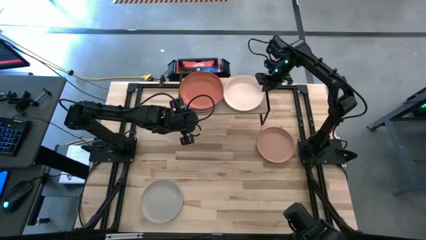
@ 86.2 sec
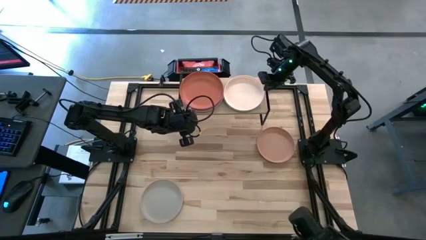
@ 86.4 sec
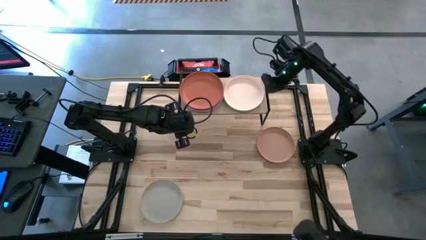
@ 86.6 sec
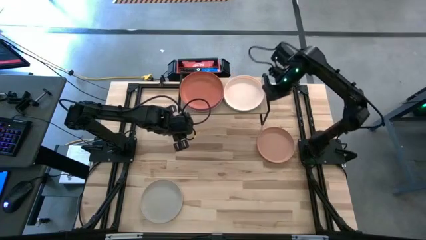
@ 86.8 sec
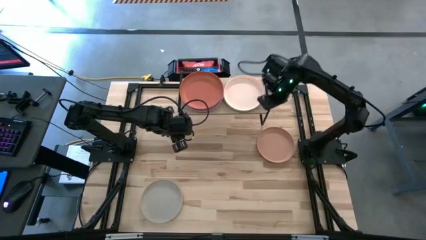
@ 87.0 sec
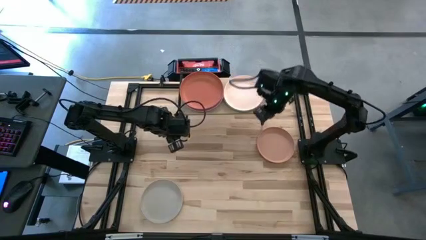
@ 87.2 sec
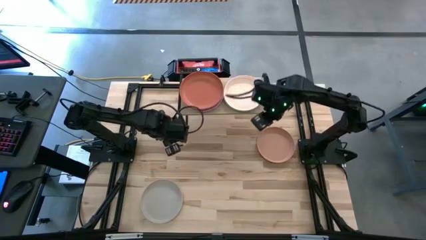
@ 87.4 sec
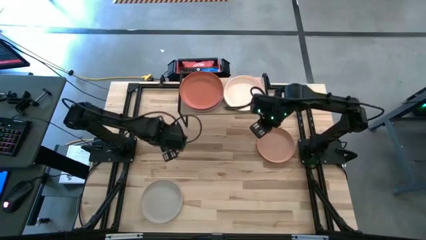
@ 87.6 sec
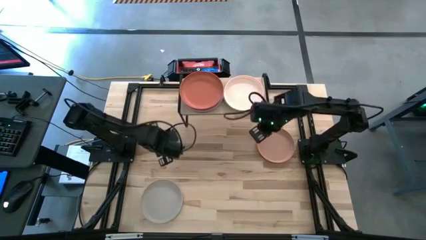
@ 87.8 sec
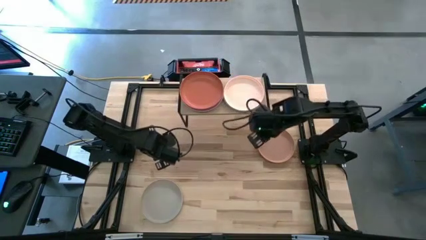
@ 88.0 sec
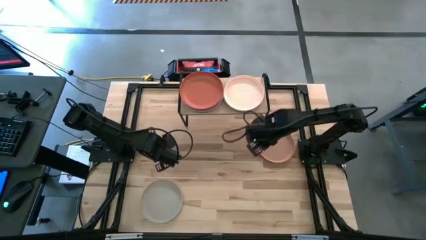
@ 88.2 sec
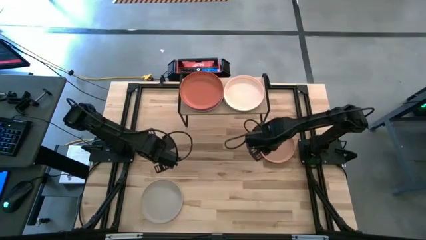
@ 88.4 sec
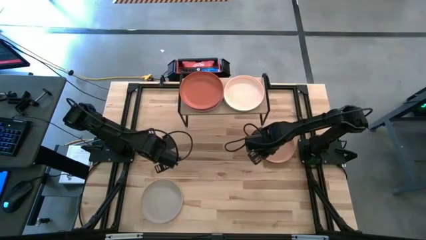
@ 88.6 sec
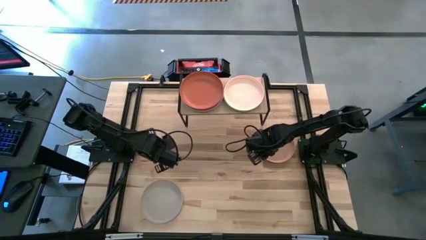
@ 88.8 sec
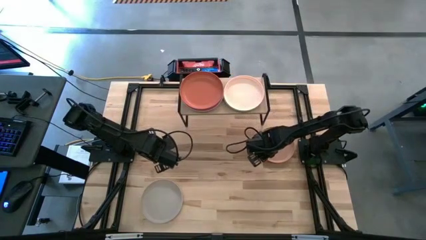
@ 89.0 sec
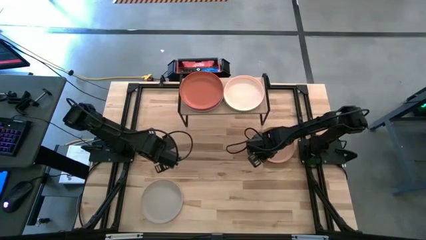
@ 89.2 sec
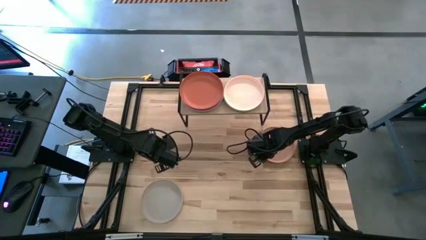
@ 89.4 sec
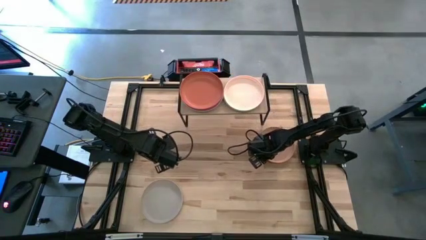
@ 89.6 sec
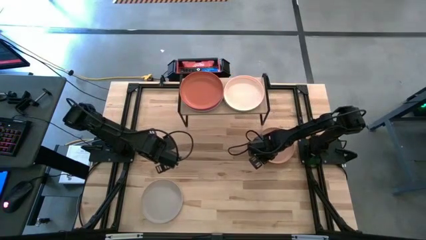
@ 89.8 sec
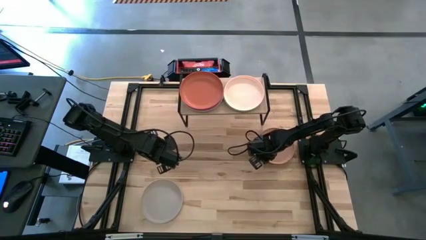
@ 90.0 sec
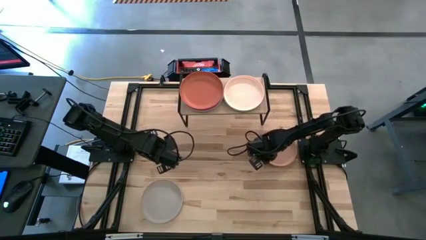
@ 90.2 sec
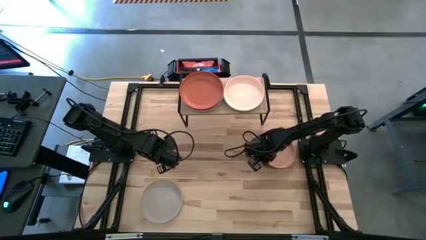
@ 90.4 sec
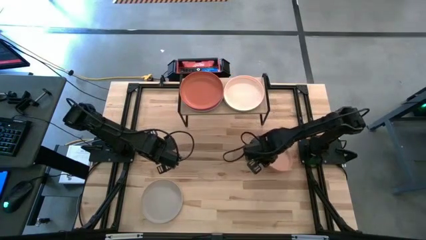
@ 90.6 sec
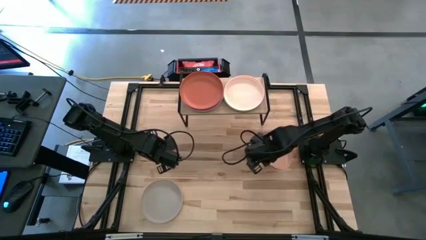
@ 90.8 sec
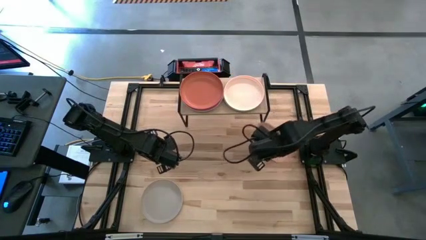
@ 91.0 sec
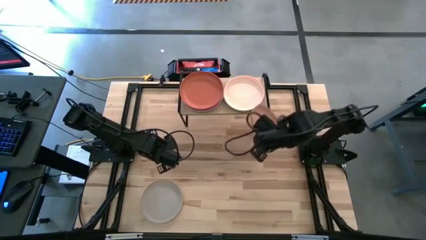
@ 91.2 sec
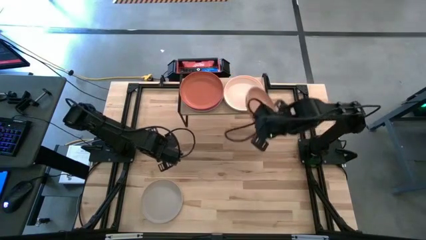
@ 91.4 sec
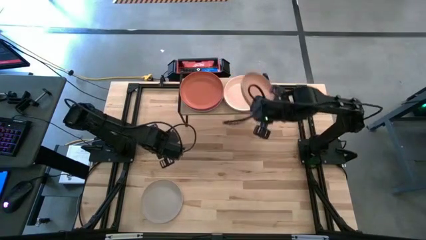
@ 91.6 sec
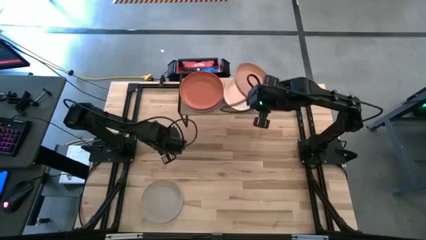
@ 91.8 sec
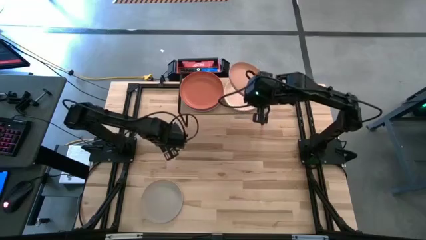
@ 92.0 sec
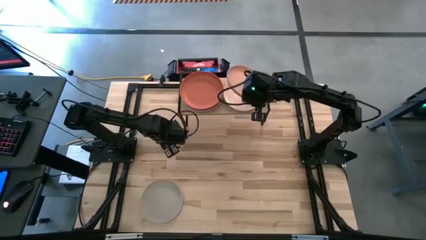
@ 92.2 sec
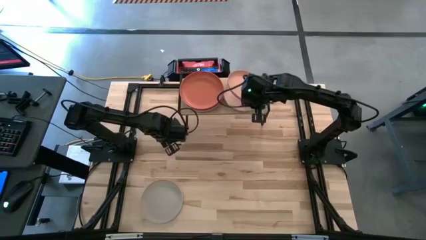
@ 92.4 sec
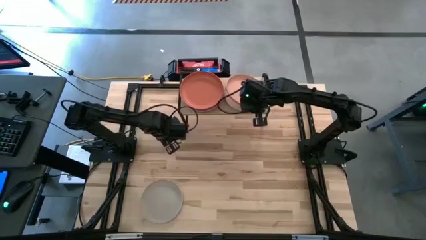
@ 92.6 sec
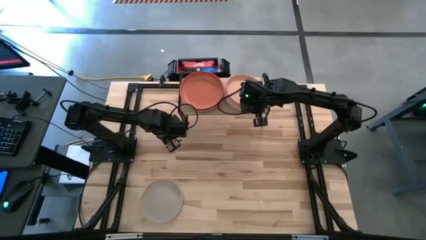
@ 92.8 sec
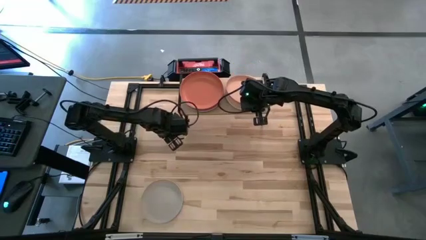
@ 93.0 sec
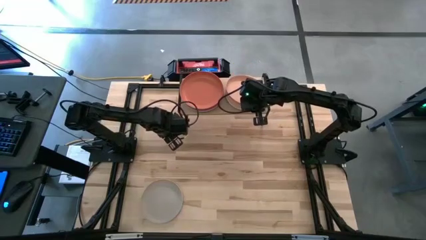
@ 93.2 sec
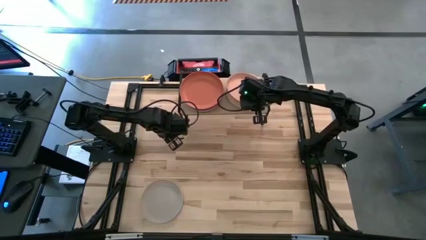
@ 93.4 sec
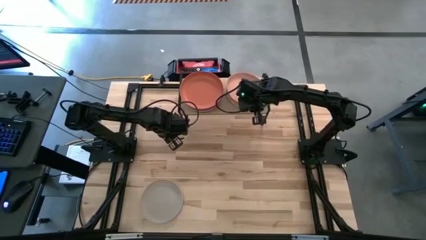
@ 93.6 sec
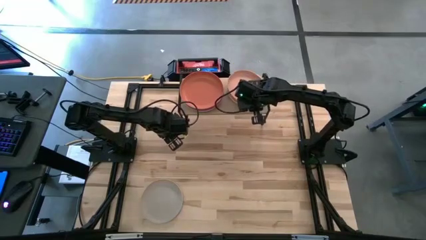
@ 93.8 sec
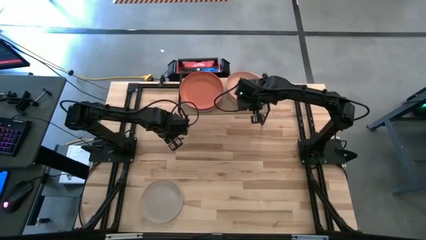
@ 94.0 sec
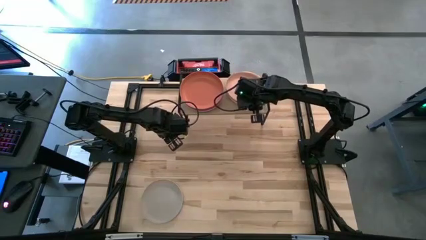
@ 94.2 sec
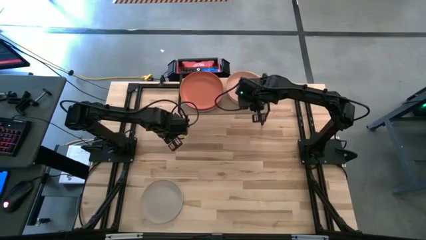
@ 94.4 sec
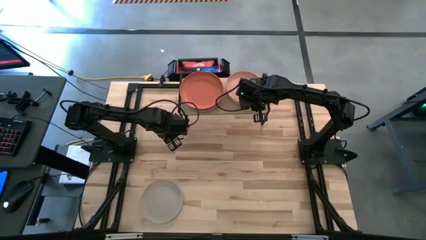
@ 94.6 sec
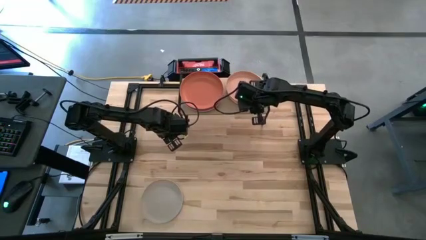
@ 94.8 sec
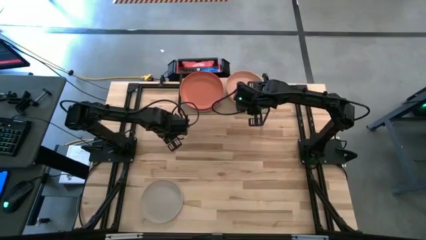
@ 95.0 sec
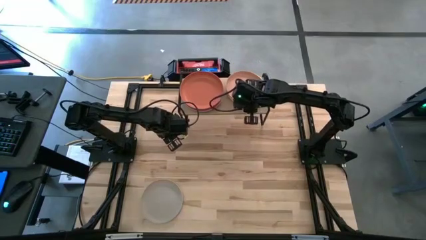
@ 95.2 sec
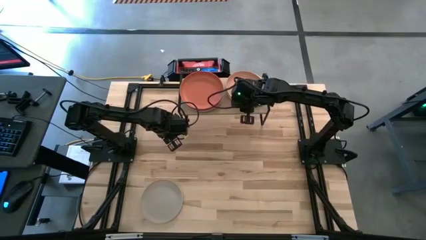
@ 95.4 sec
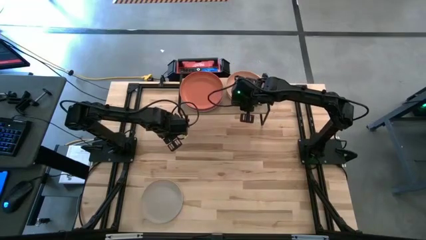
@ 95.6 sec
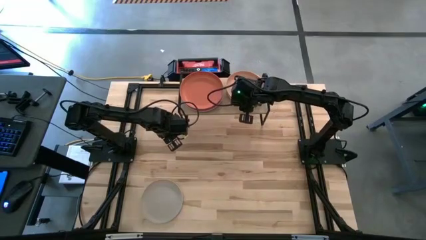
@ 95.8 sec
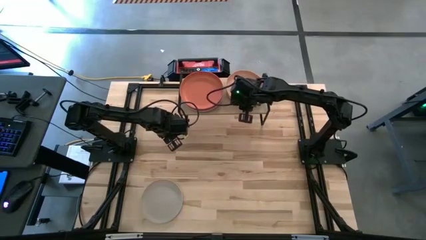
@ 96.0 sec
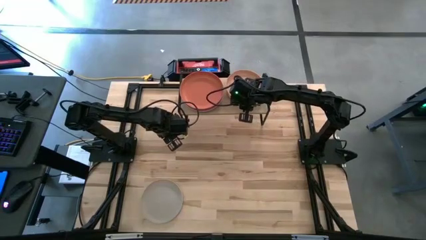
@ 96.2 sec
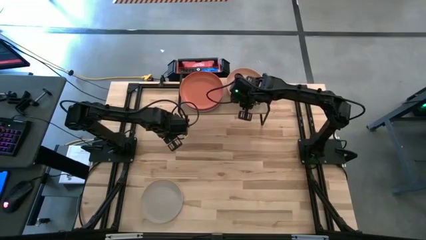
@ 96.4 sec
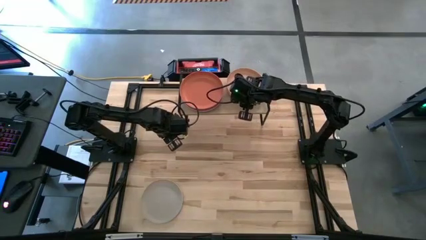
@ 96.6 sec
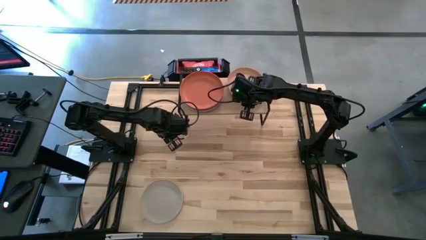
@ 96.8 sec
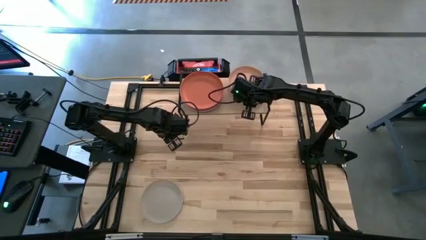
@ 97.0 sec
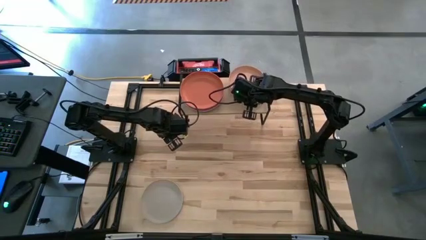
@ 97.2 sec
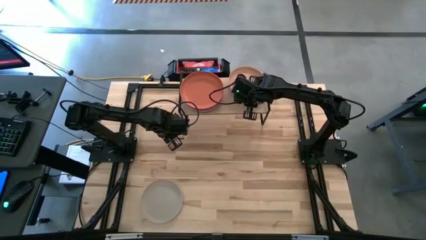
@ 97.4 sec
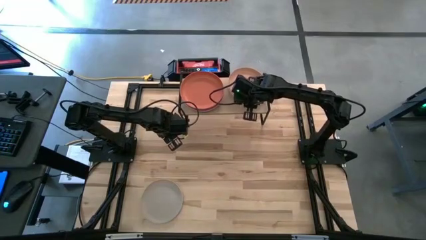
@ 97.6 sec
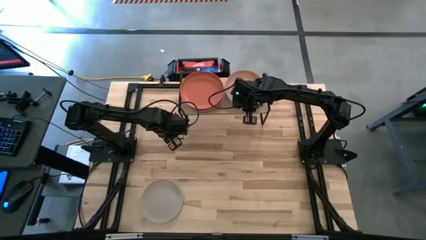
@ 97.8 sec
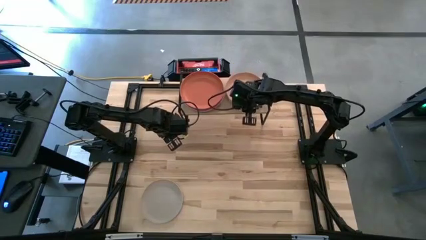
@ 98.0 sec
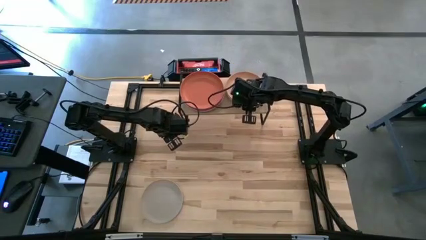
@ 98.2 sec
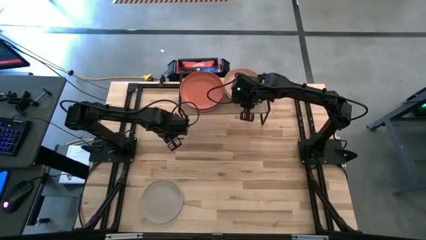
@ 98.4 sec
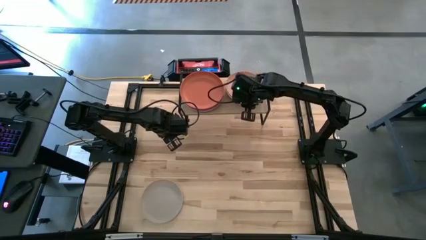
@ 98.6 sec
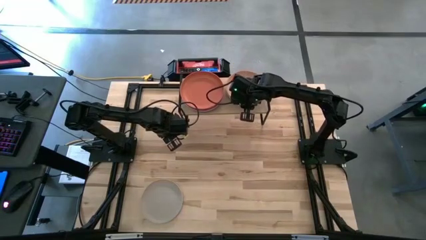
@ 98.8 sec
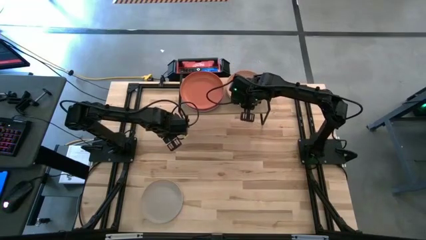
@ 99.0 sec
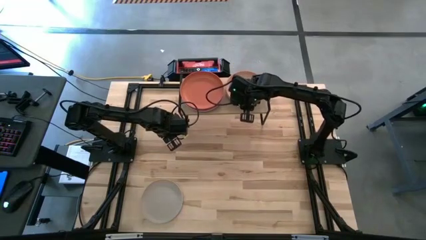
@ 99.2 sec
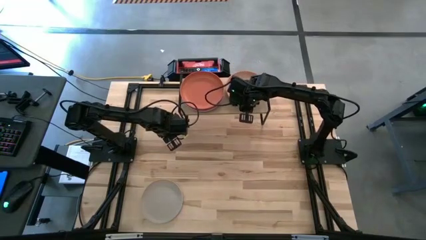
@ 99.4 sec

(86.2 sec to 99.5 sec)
Task: Place and stack plates onto a shelf
Stack the brown plate on top of the light orange plate on the shelf
